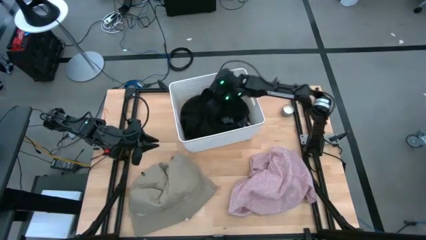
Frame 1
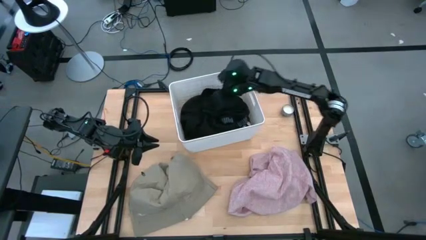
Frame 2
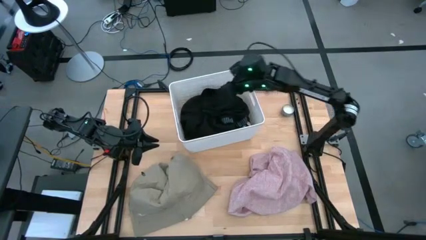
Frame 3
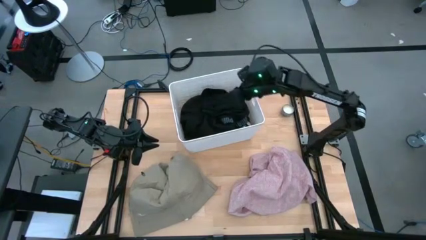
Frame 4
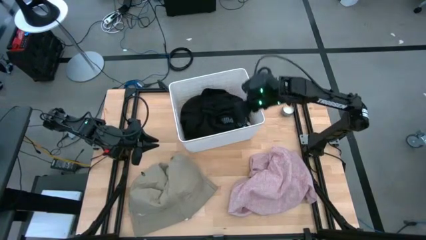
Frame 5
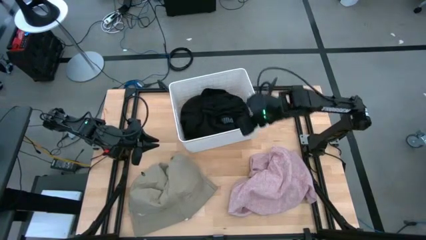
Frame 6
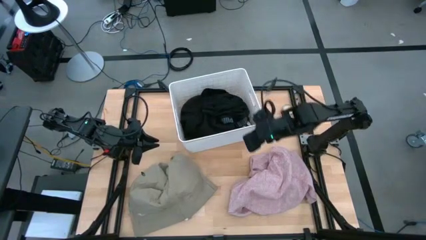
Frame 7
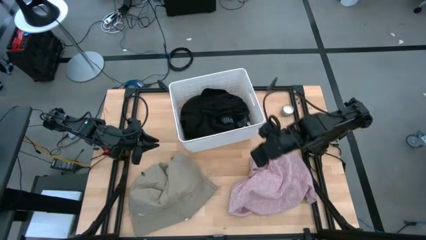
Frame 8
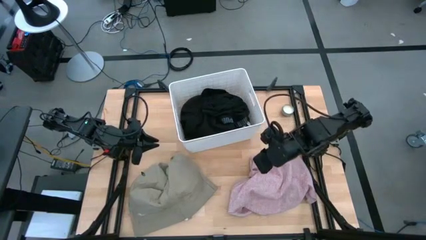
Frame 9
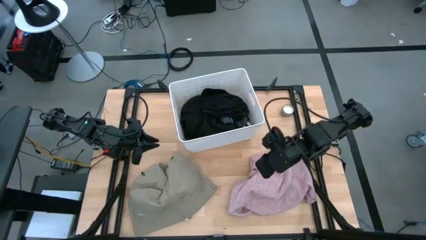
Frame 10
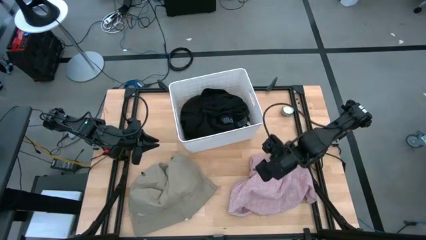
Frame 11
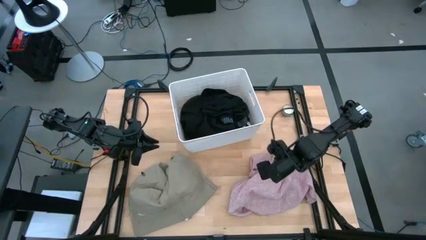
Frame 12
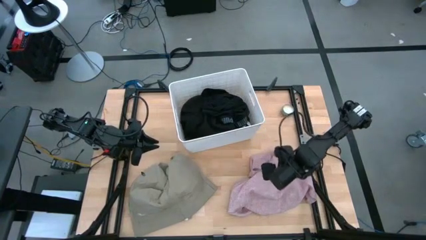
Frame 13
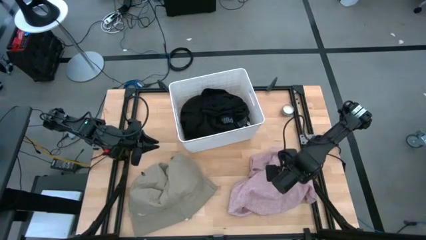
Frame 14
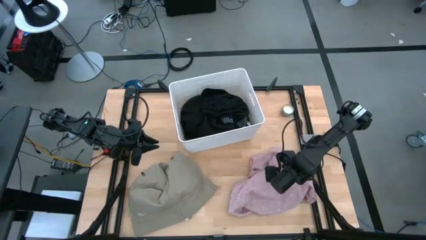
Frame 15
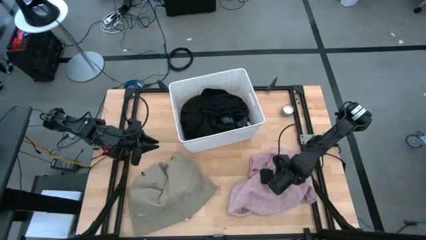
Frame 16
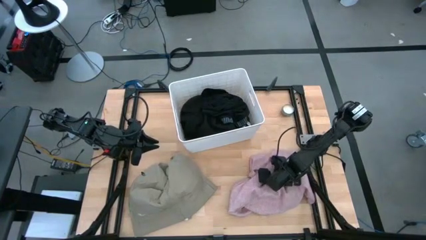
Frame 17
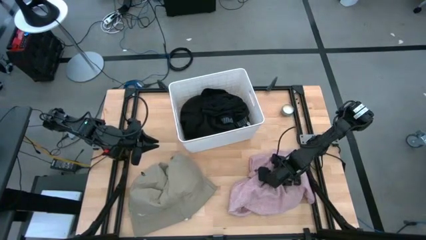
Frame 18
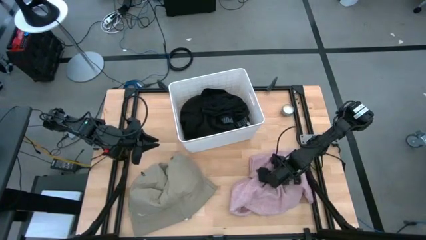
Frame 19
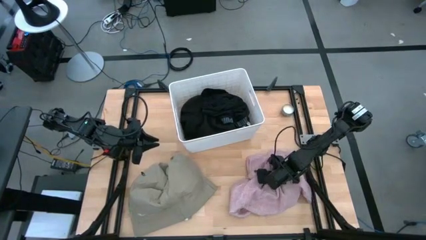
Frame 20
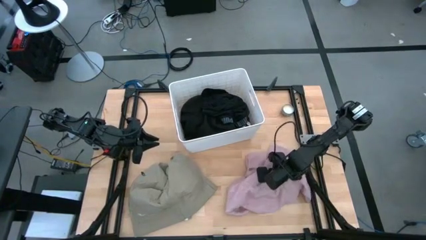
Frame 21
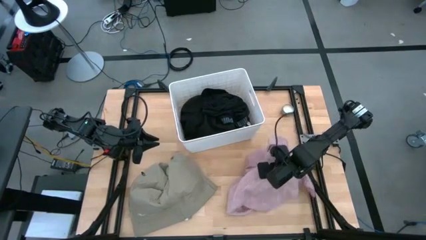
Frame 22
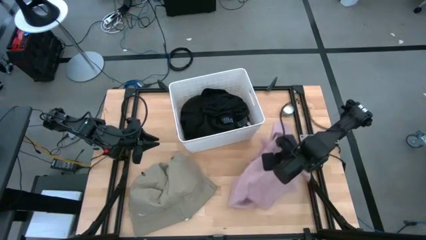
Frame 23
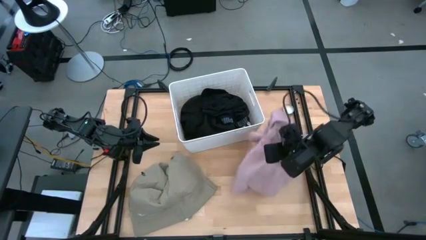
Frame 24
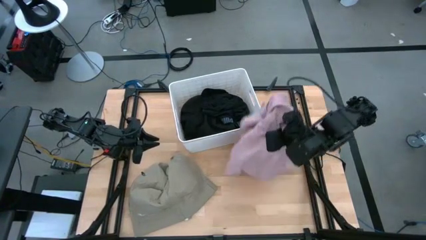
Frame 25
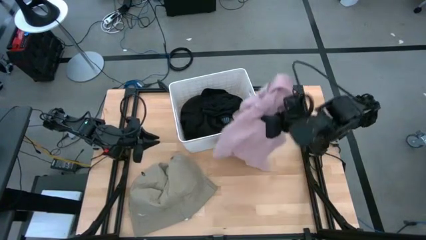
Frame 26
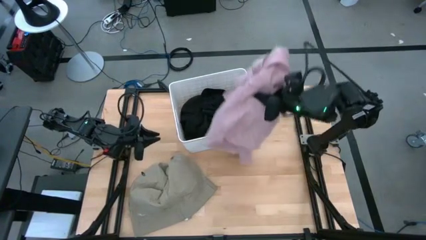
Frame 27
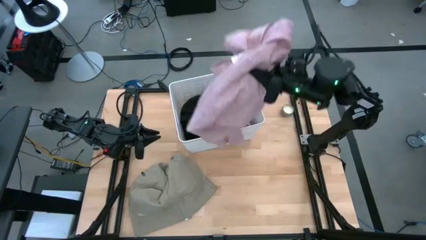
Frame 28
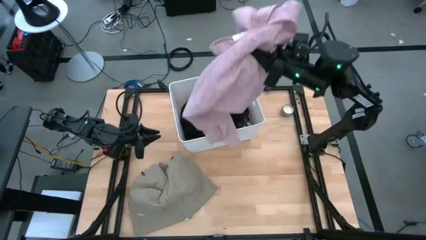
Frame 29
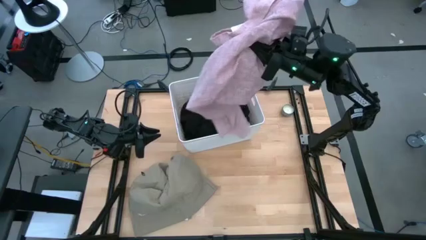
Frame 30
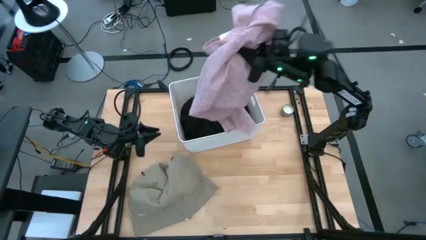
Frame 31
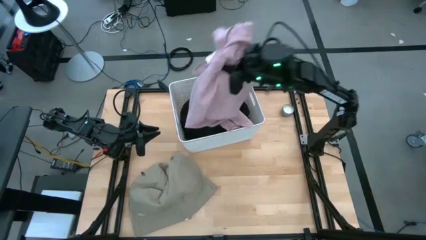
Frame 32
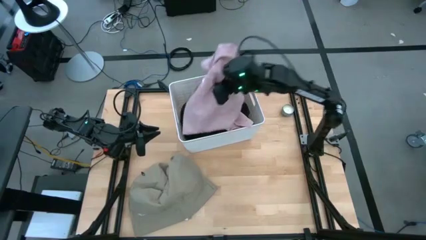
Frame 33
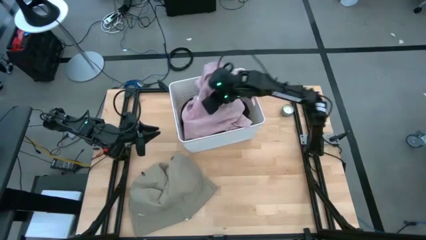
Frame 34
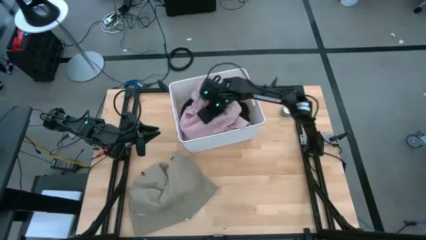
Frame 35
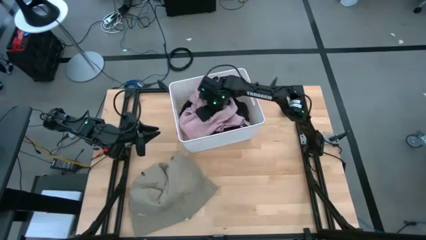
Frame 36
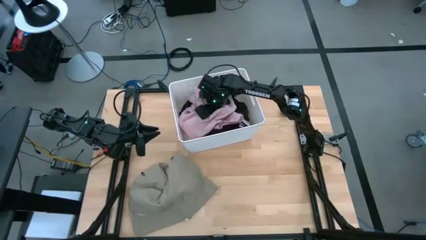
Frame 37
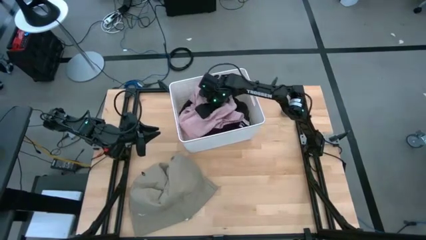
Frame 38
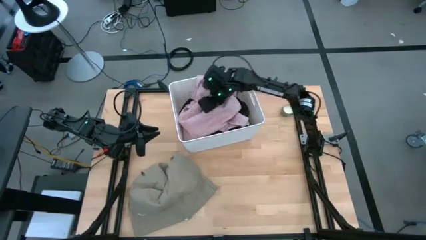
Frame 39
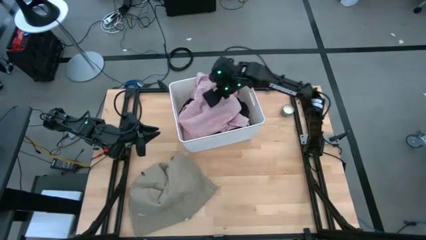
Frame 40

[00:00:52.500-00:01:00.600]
Task: Sort clothes
Put the pink shirt into the white laundry bin

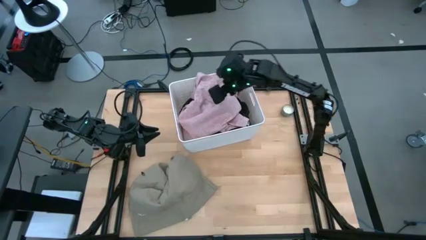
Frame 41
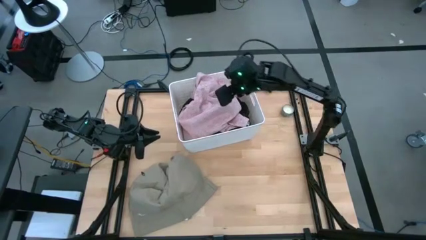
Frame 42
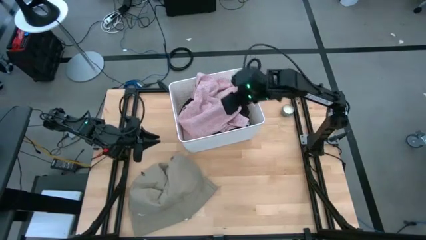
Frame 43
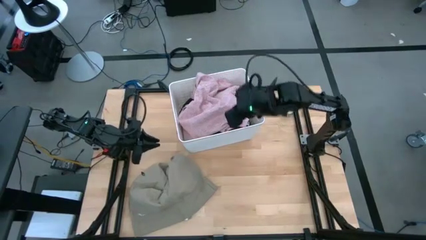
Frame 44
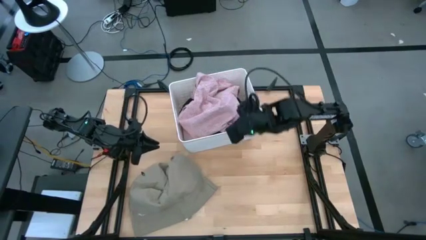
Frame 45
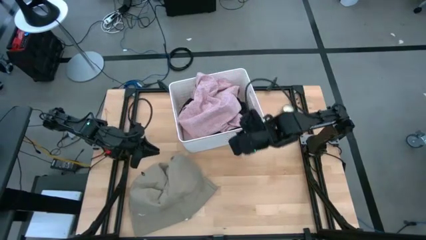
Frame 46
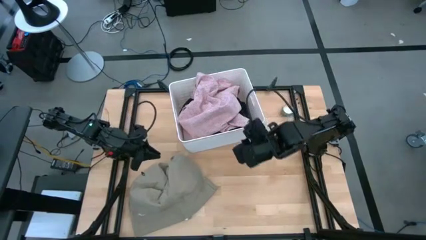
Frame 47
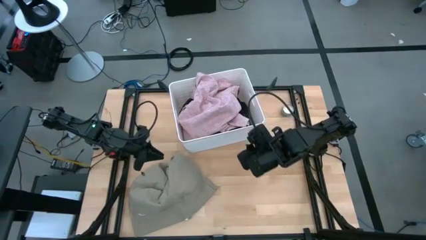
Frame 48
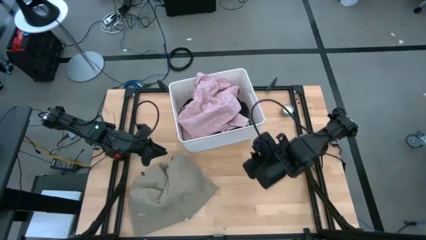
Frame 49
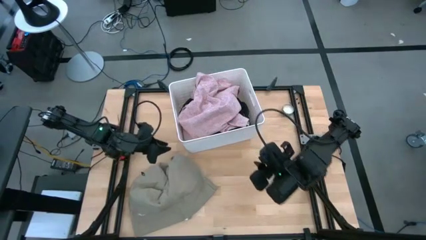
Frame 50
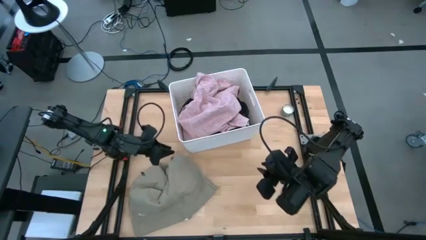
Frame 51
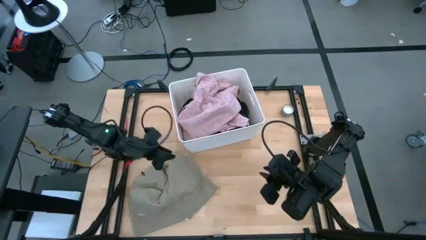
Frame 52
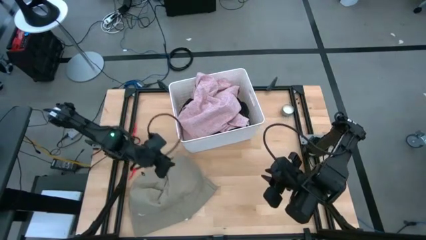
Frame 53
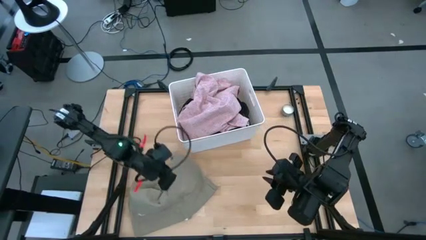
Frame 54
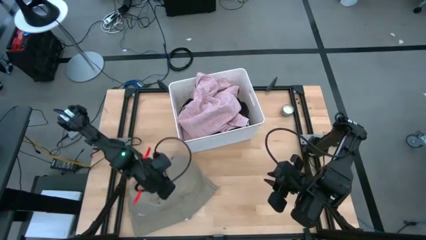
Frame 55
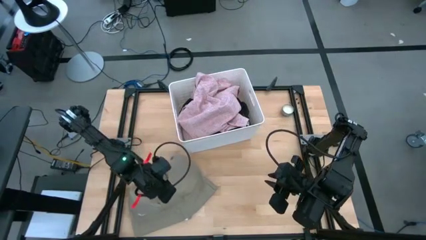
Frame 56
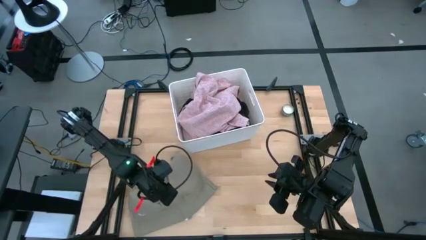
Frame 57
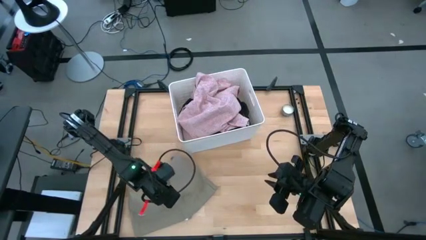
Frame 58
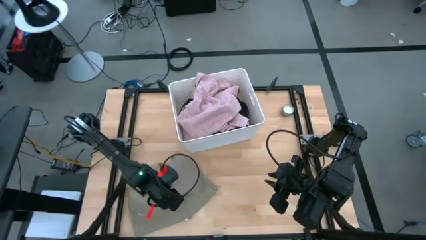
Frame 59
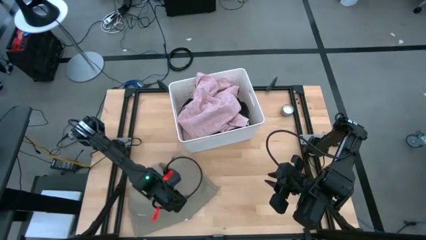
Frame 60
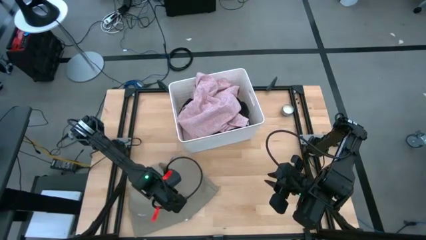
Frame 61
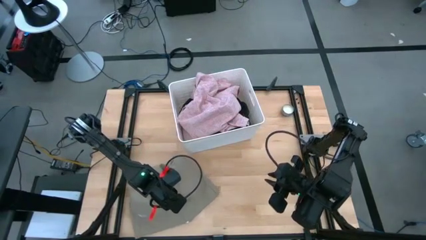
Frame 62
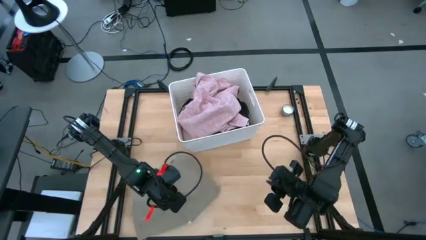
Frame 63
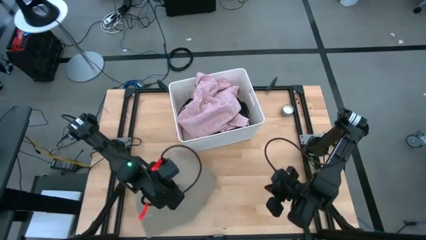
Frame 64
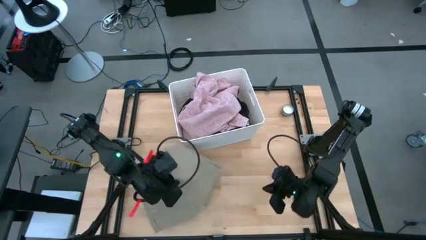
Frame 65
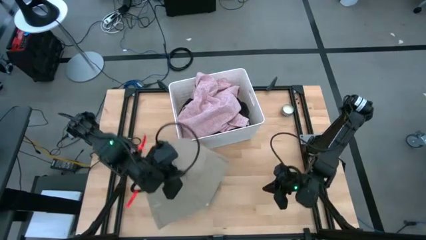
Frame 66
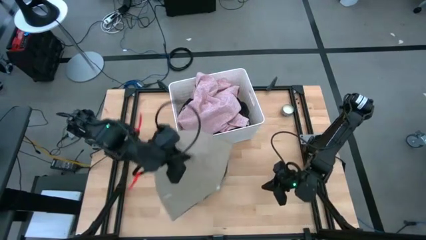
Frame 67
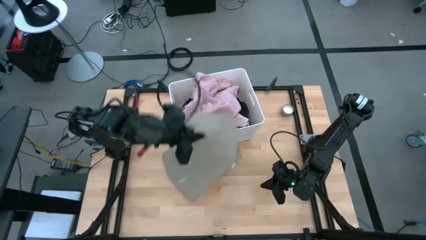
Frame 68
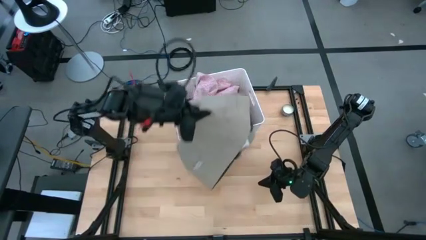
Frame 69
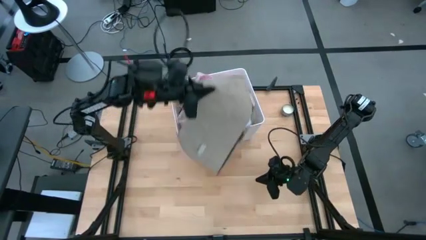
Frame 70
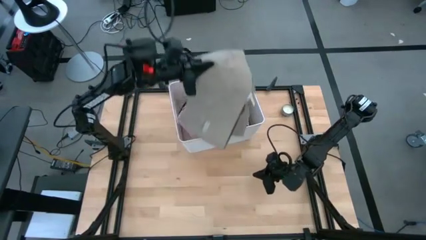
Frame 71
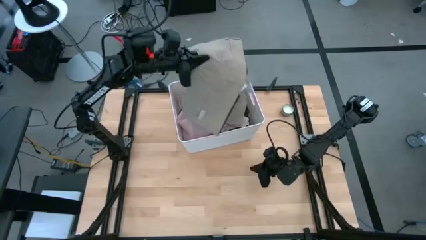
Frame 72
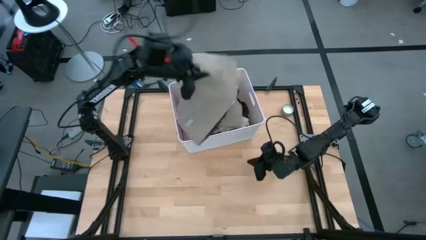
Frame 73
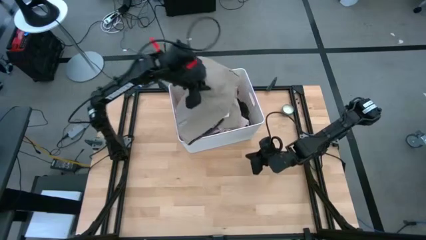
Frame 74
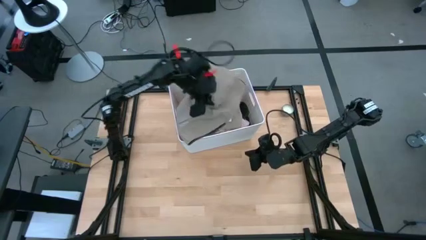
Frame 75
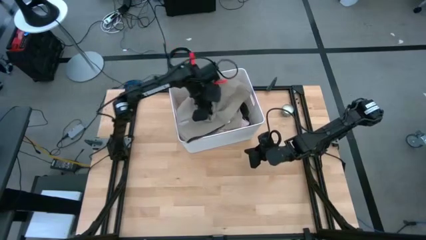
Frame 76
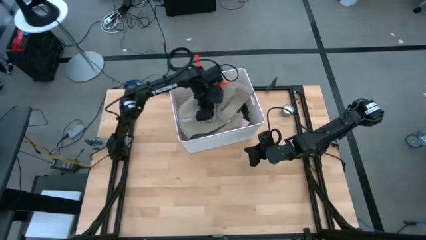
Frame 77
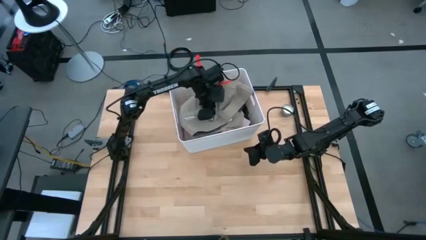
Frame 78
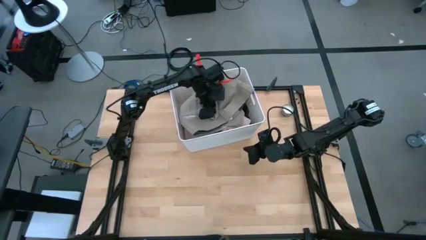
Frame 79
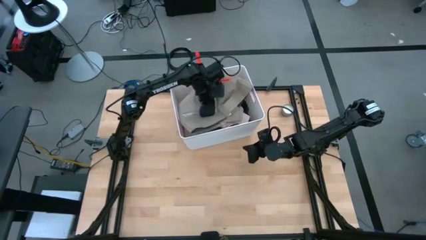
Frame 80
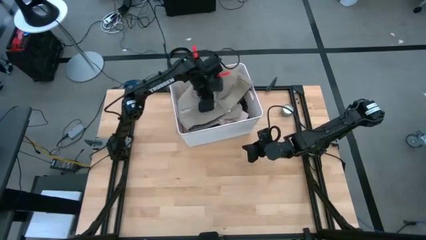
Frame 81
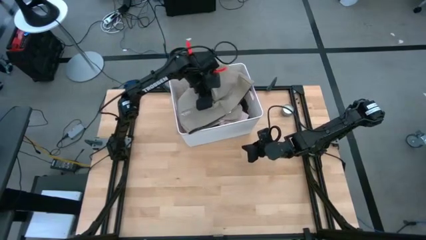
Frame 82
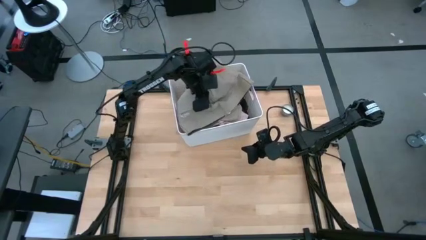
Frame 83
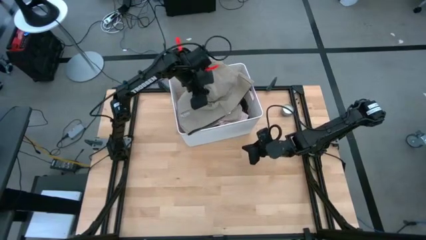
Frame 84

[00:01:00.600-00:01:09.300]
Put the light brown shorts into the white laundry bin
